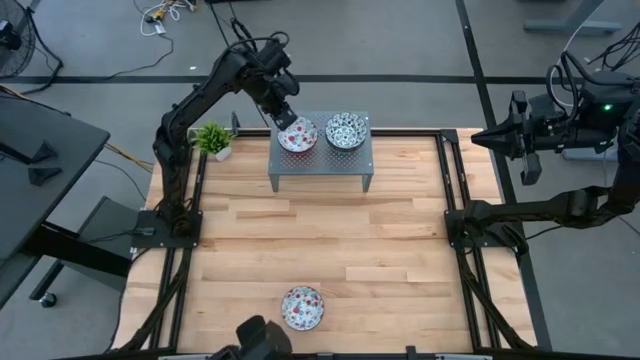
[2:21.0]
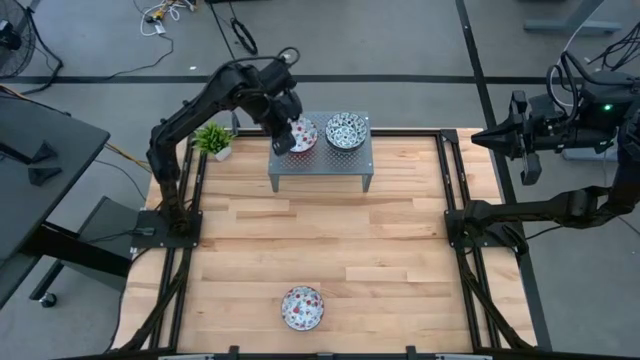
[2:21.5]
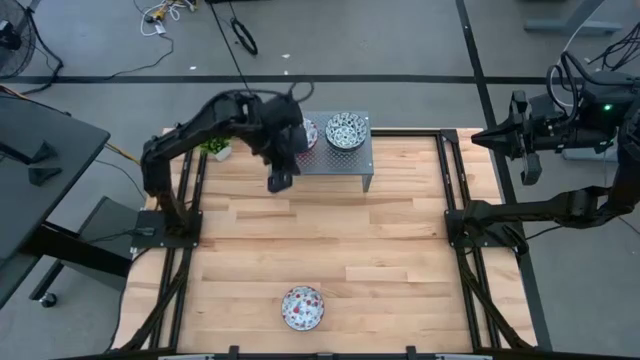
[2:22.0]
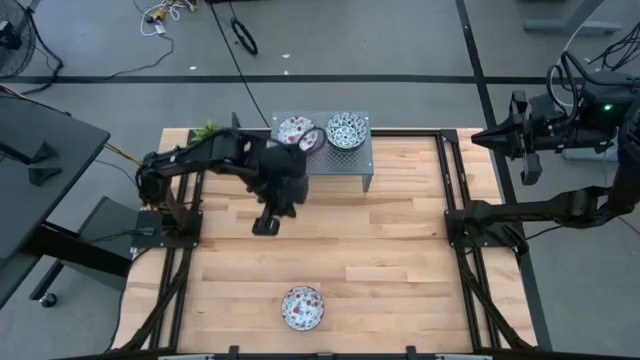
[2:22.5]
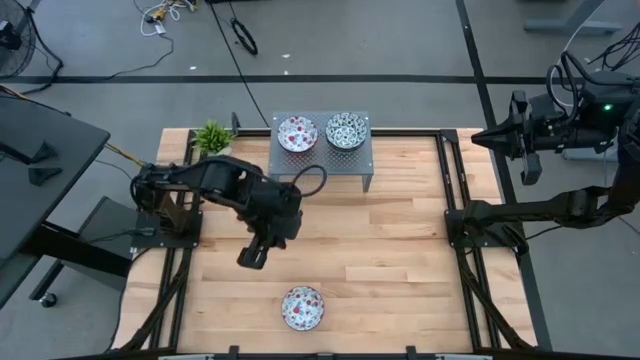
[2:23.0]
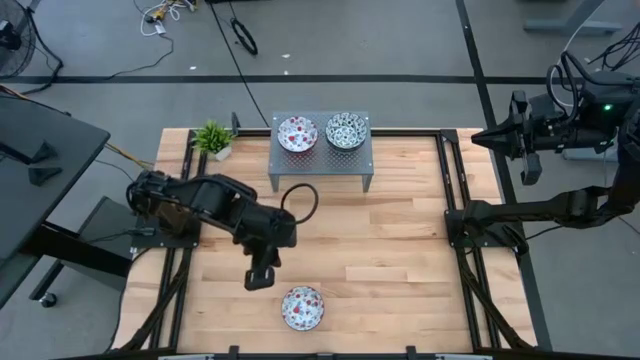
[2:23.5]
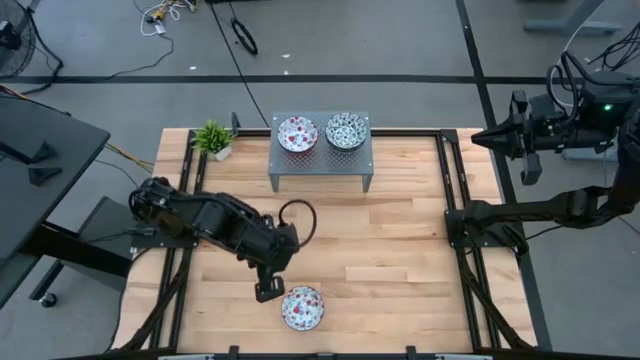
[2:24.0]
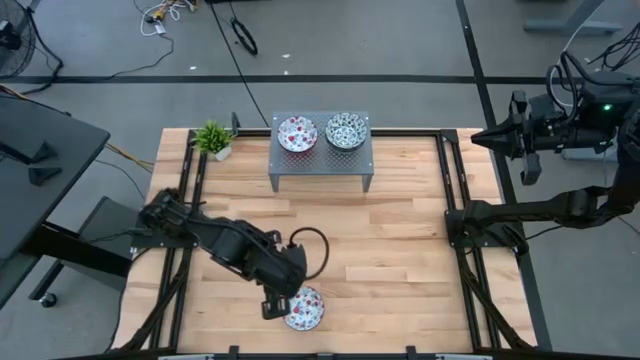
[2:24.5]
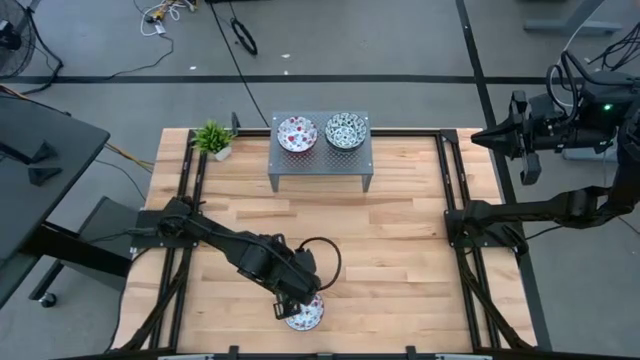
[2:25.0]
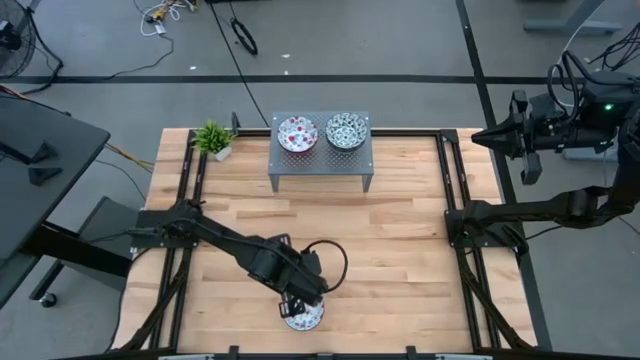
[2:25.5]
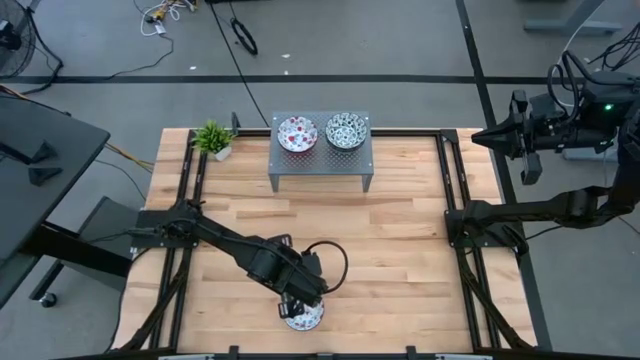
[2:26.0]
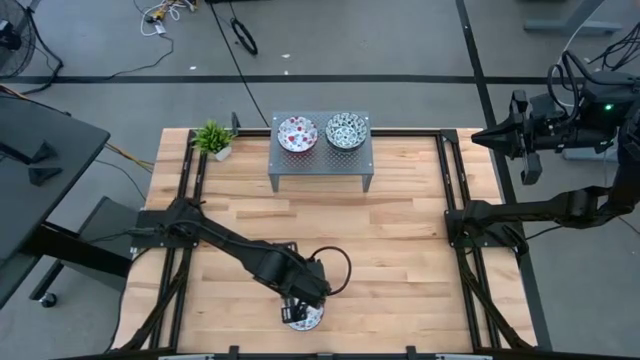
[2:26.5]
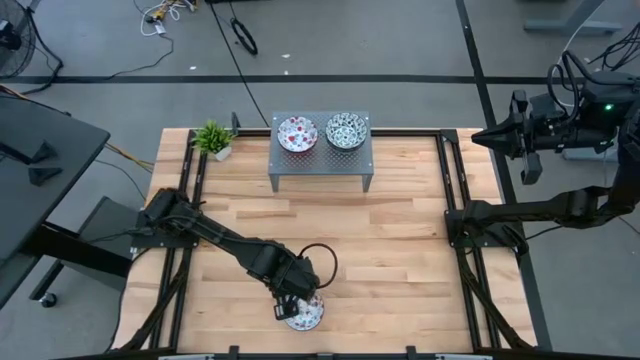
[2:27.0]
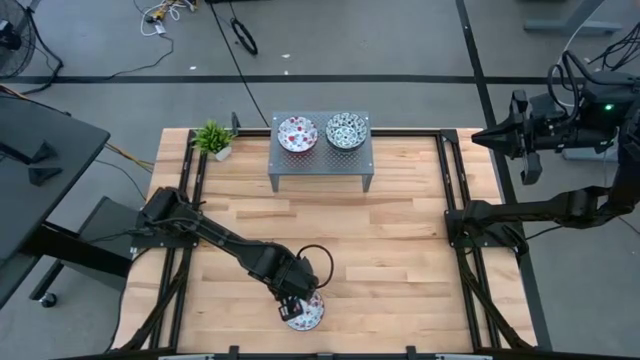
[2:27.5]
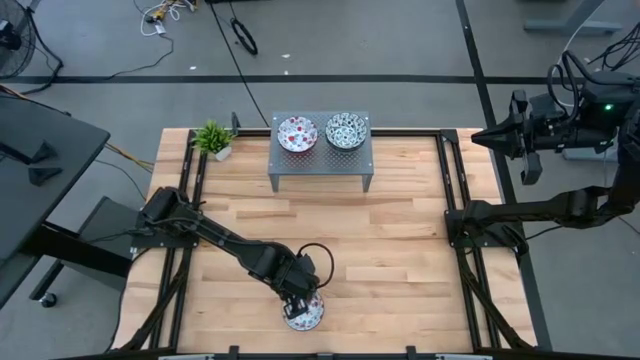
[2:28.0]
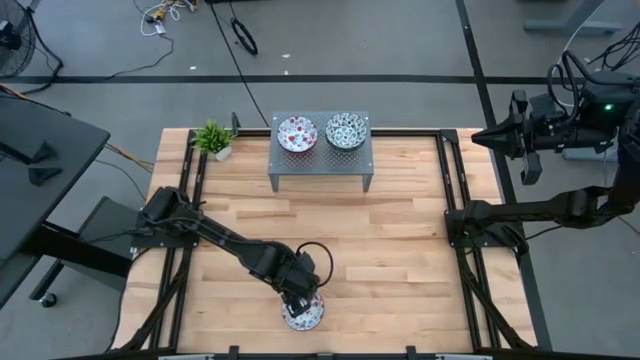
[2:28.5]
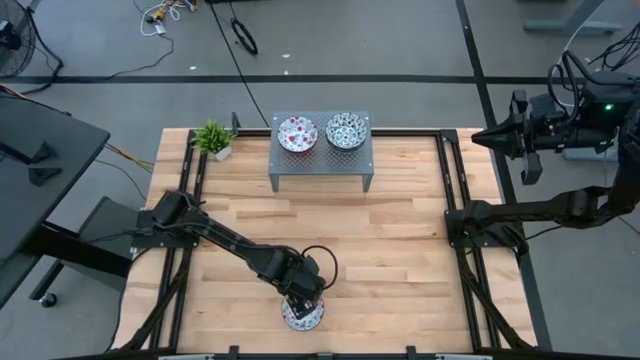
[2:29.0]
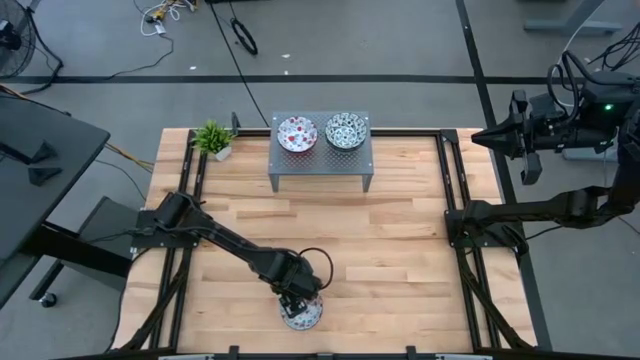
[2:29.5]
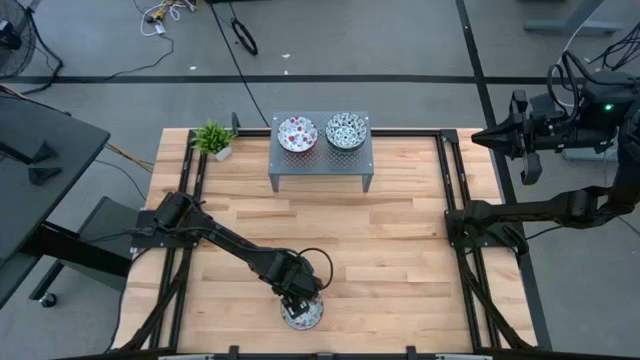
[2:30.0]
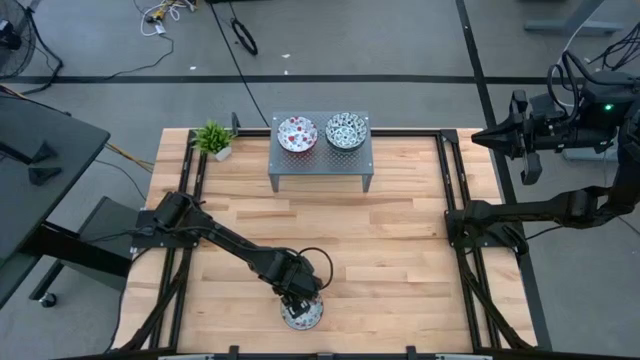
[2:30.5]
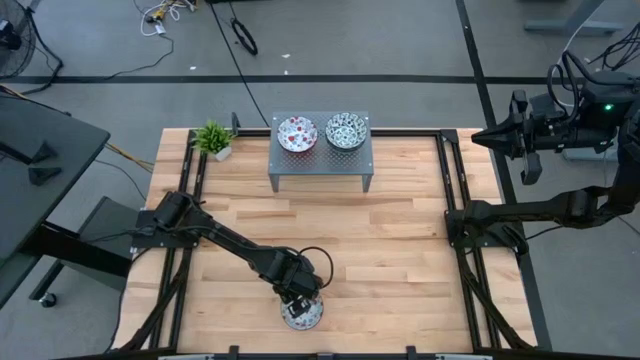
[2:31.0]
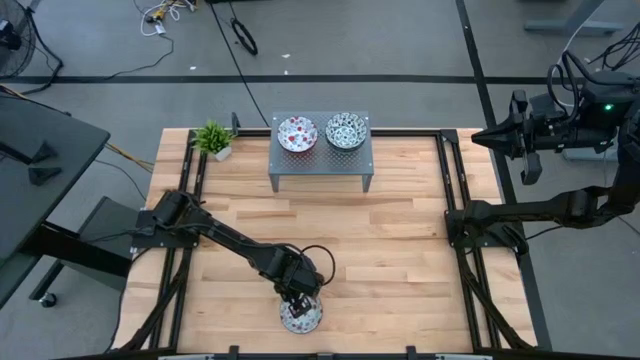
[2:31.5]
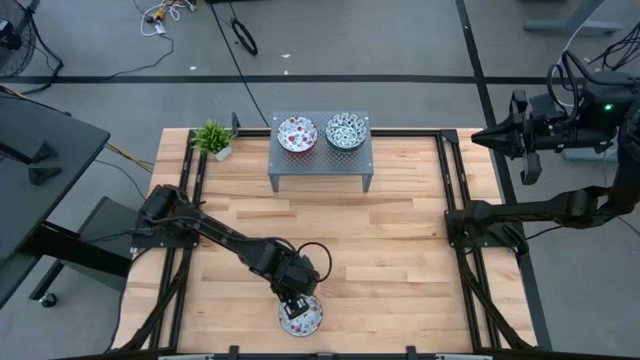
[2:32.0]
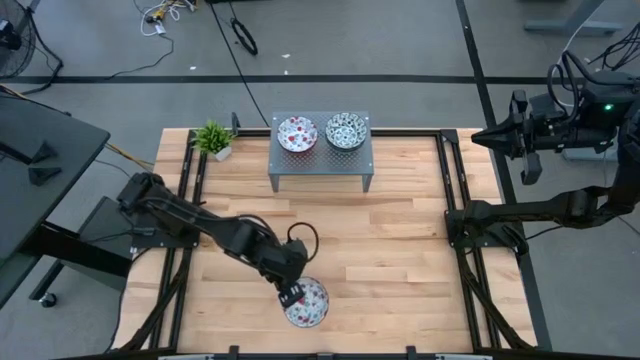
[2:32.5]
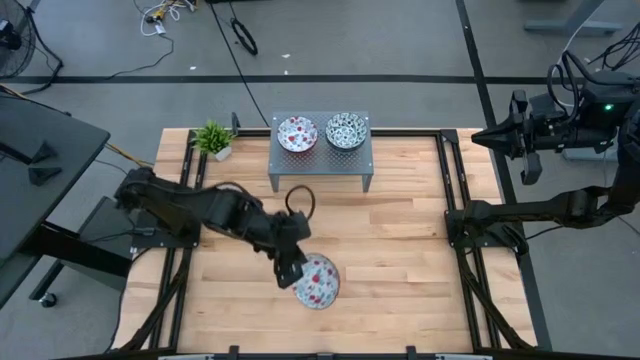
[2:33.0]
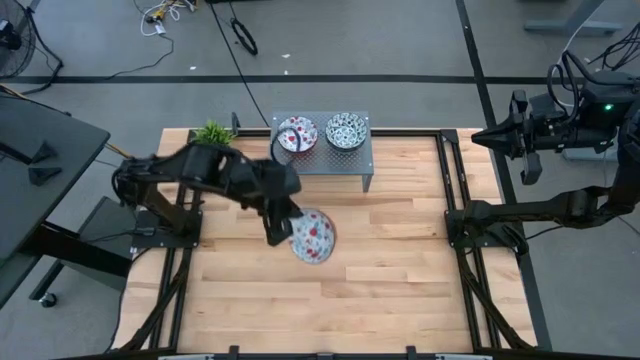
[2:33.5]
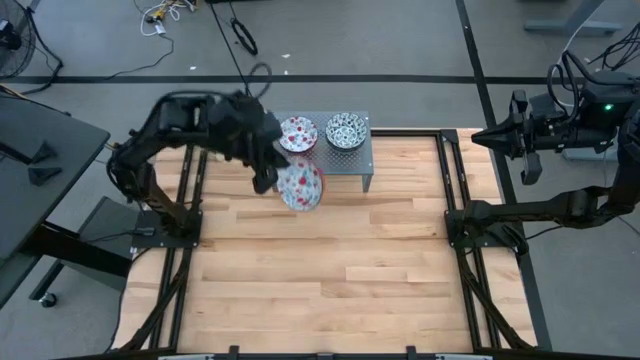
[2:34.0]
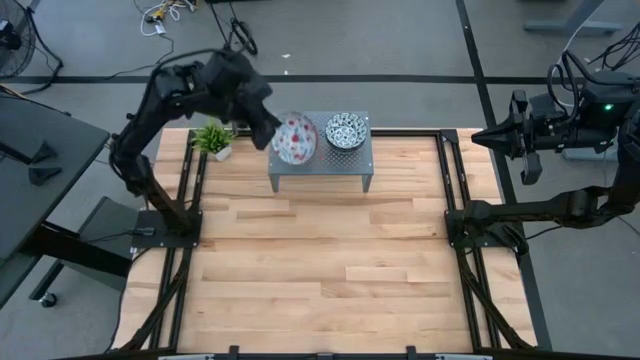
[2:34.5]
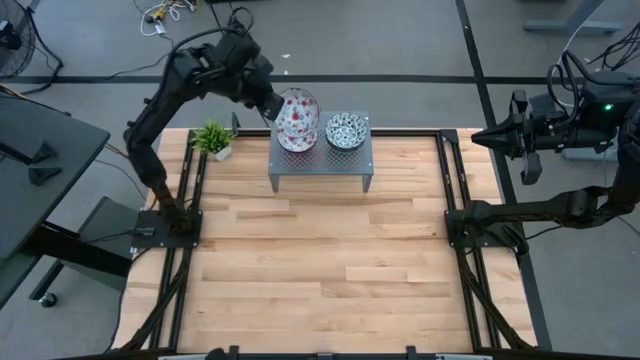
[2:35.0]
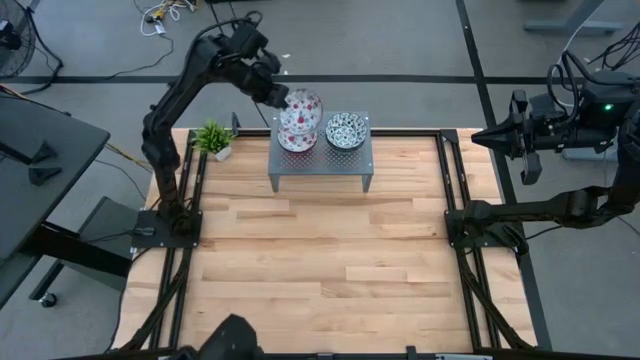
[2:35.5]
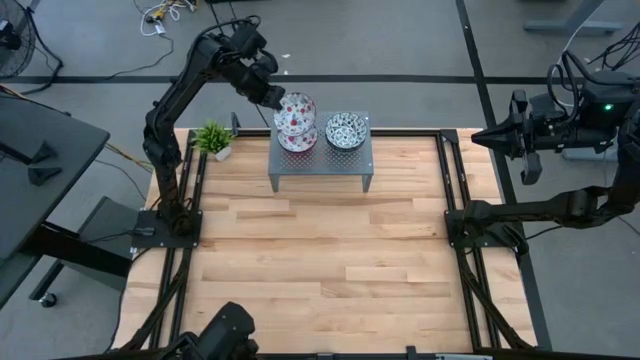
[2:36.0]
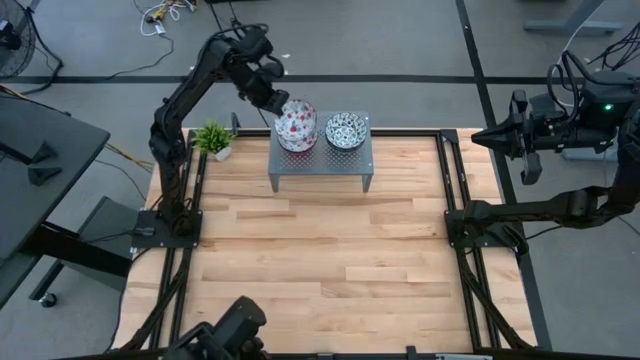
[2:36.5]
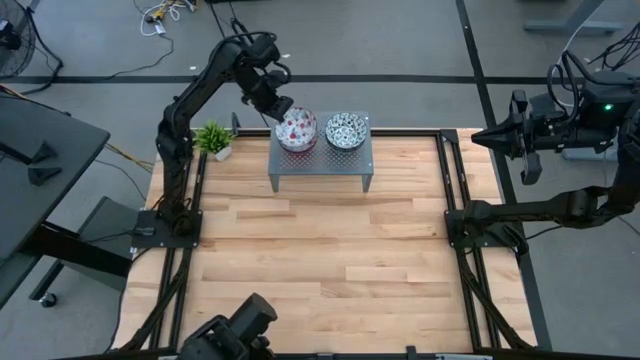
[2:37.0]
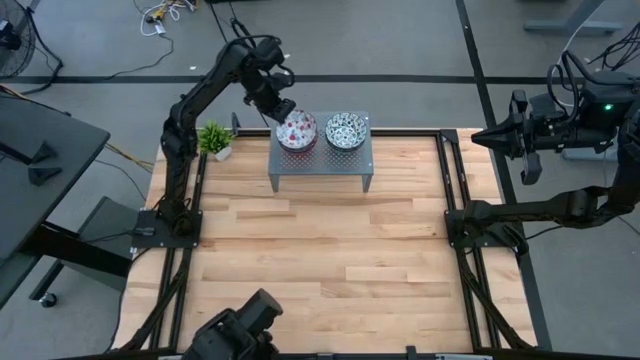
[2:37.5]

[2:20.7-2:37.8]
Task: Pick & Place Mini bowls
Stack the red and white patterned bowl on top of the other red and white patterned bowls on the shelf

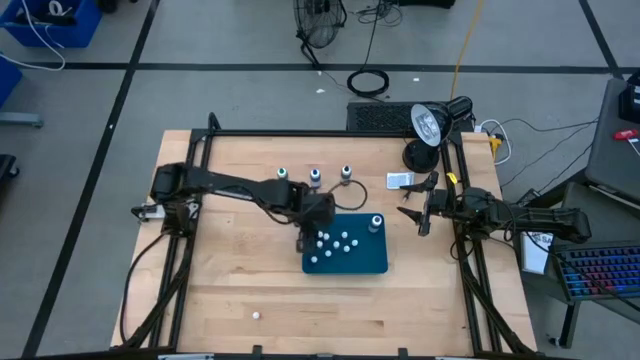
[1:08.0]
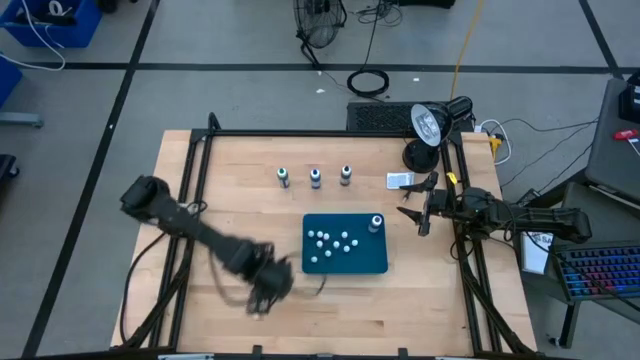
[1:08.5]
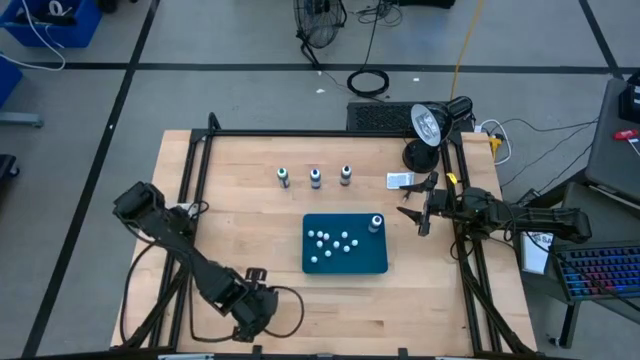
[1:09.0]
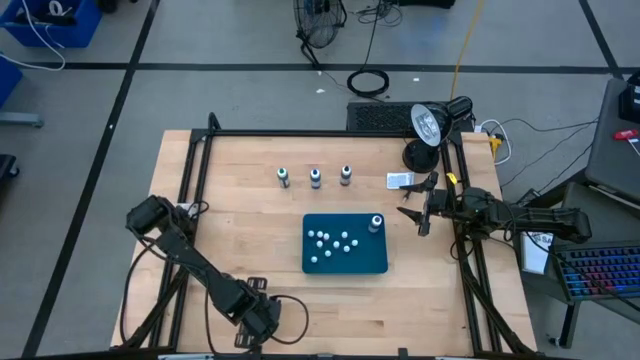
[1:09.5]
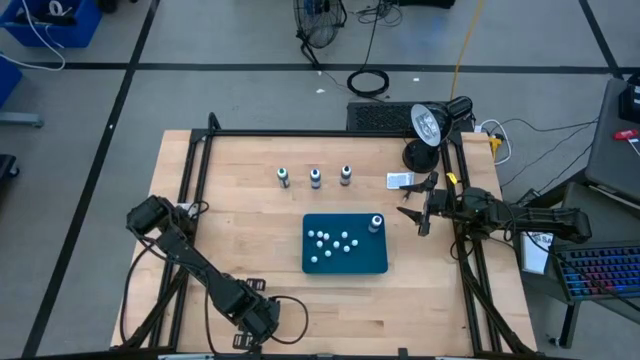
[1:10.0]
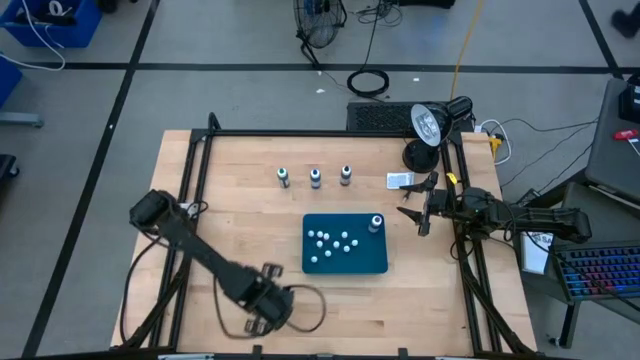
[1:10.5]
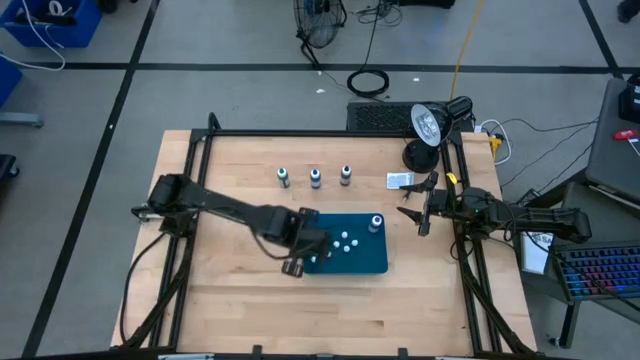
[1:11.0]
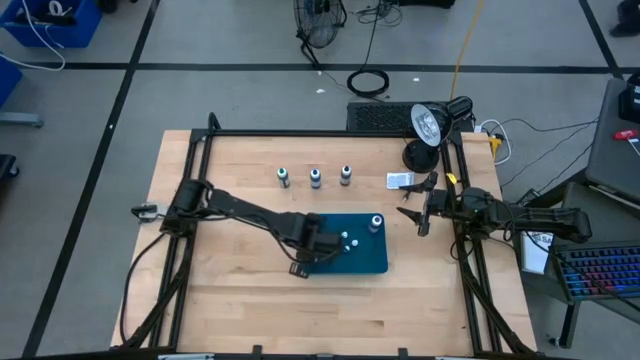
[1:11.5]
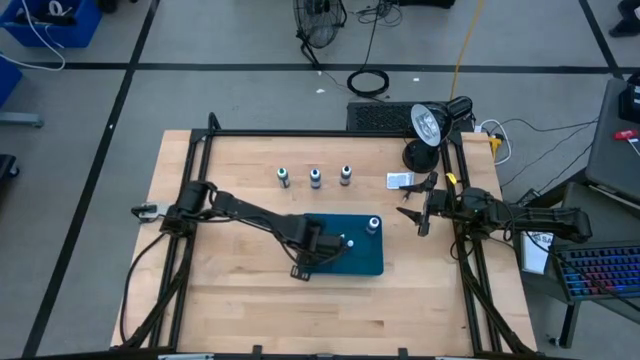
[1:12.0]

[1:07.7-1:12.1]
Task: Pick & Place food coloring
Put the small orange food coloring bottle into the blue bin
